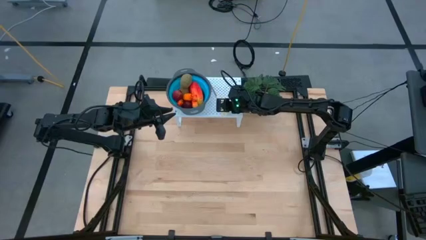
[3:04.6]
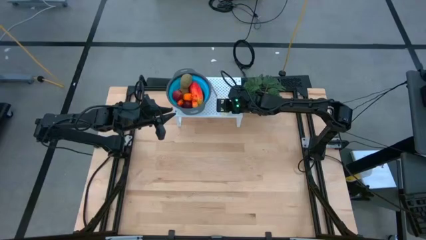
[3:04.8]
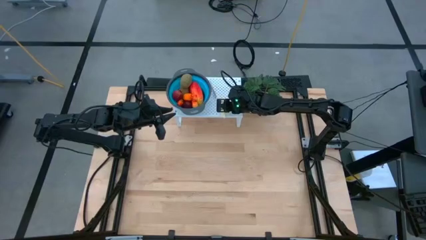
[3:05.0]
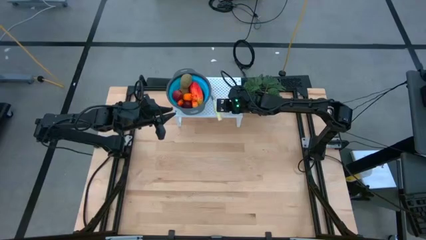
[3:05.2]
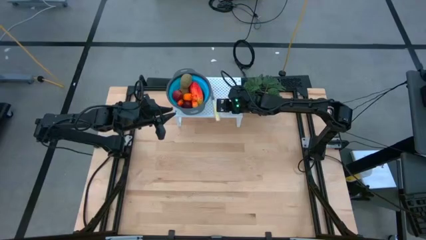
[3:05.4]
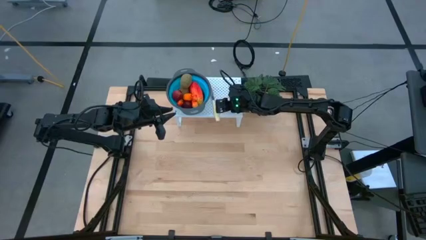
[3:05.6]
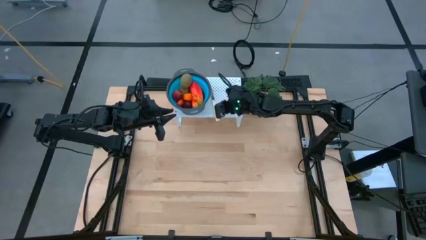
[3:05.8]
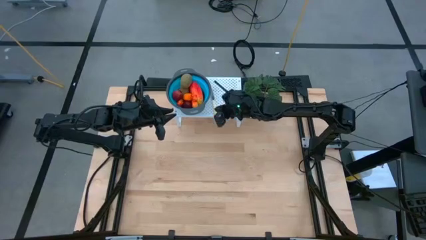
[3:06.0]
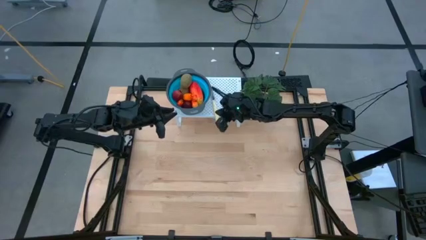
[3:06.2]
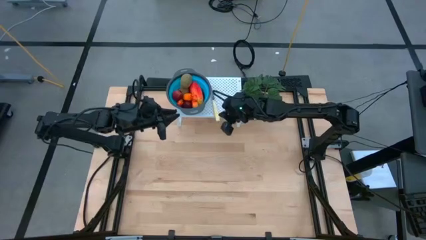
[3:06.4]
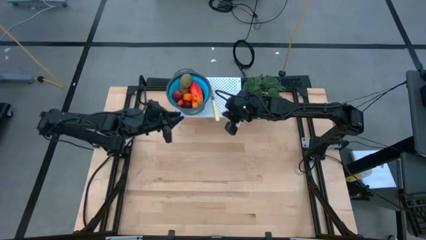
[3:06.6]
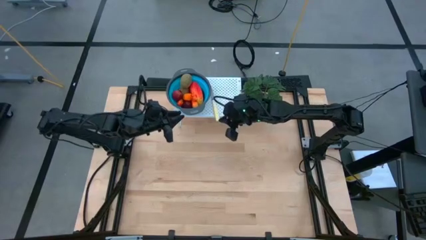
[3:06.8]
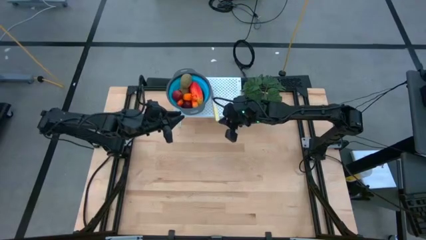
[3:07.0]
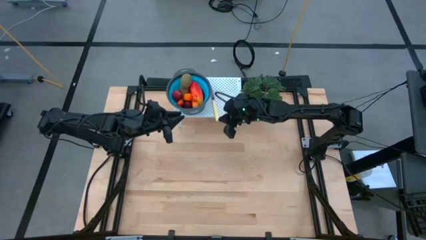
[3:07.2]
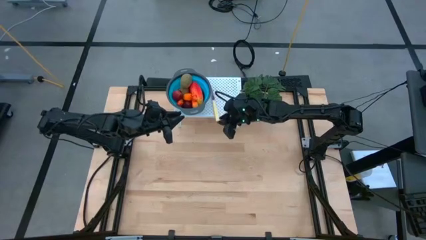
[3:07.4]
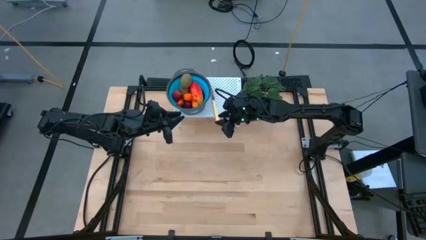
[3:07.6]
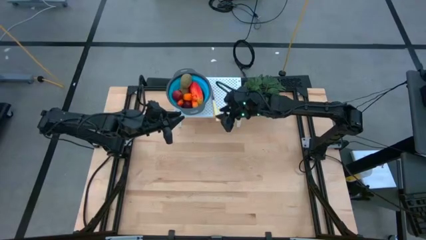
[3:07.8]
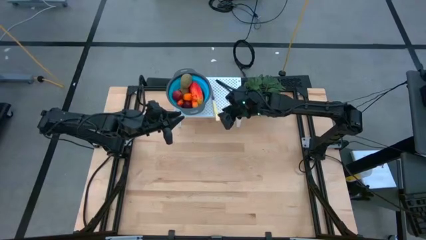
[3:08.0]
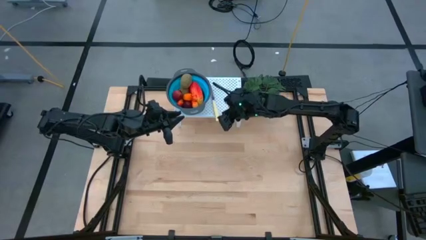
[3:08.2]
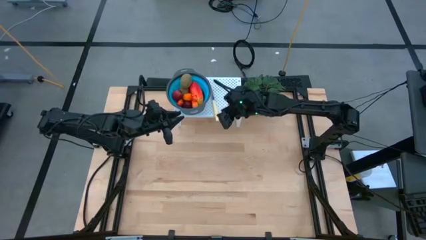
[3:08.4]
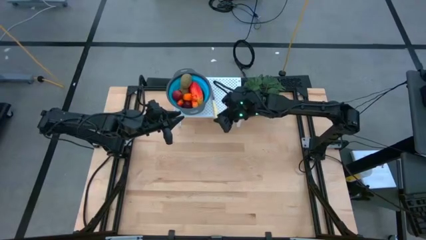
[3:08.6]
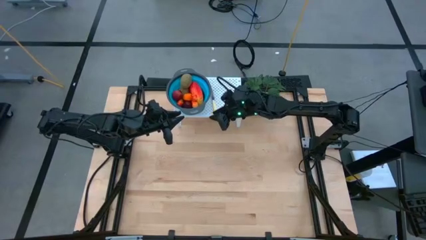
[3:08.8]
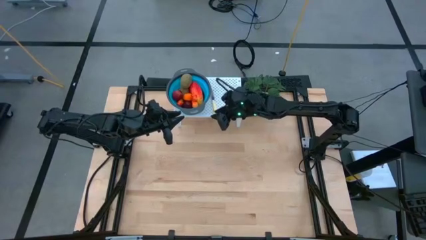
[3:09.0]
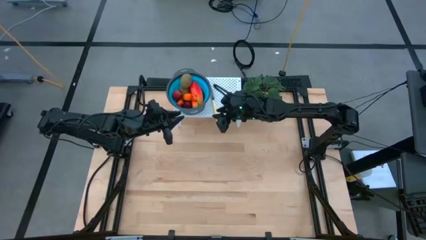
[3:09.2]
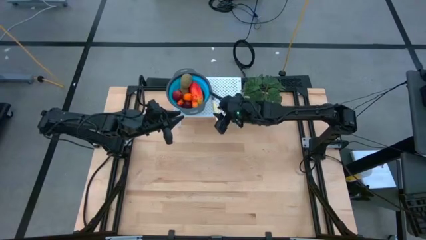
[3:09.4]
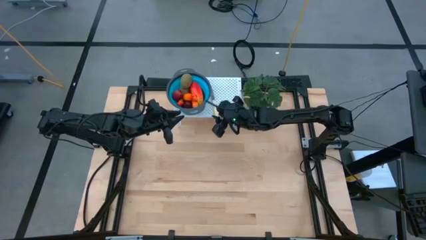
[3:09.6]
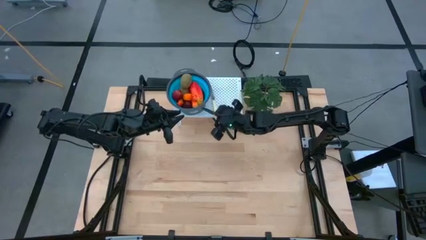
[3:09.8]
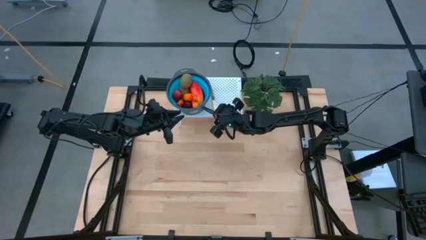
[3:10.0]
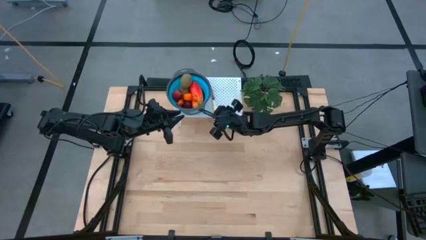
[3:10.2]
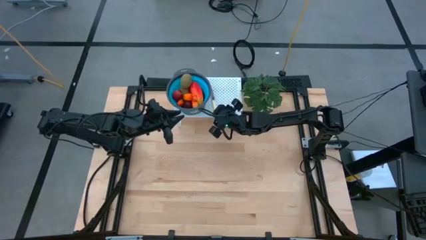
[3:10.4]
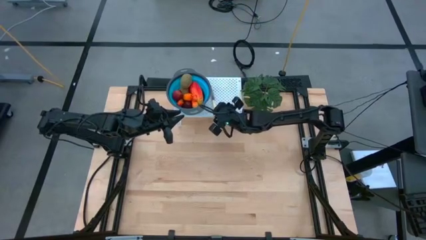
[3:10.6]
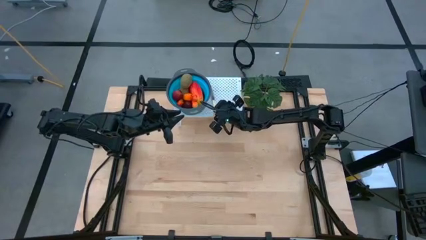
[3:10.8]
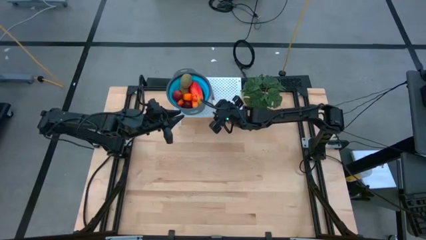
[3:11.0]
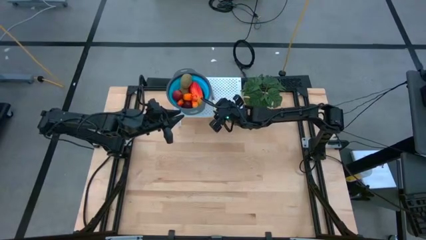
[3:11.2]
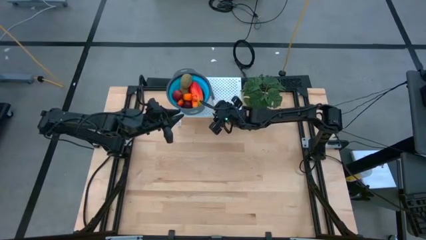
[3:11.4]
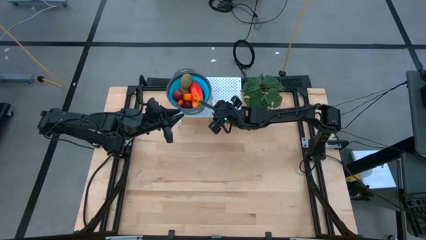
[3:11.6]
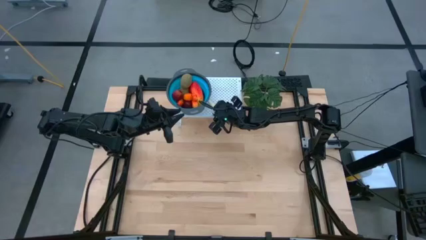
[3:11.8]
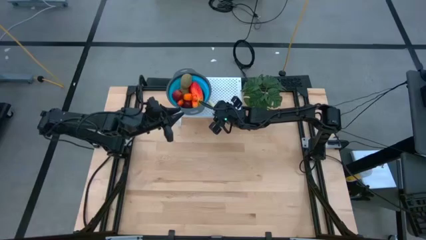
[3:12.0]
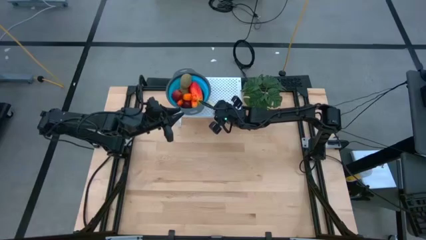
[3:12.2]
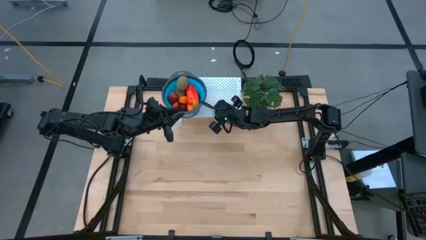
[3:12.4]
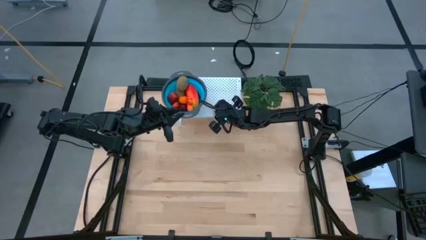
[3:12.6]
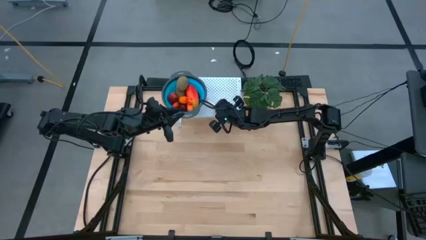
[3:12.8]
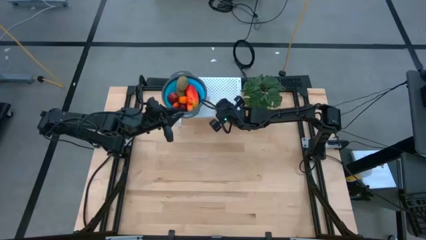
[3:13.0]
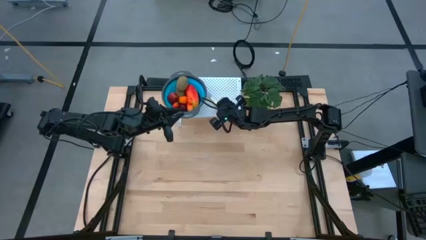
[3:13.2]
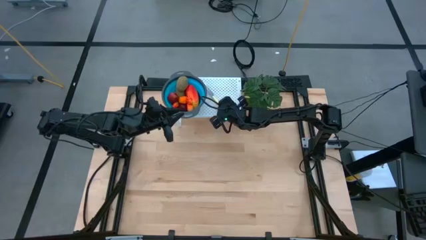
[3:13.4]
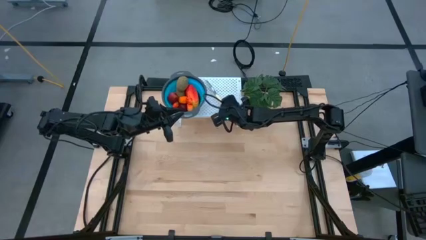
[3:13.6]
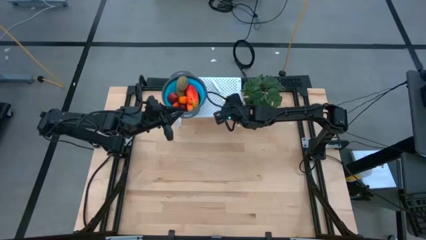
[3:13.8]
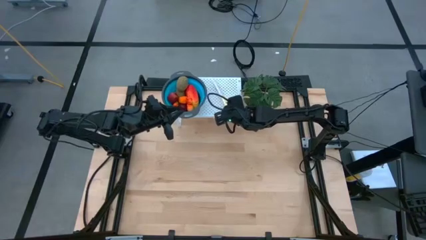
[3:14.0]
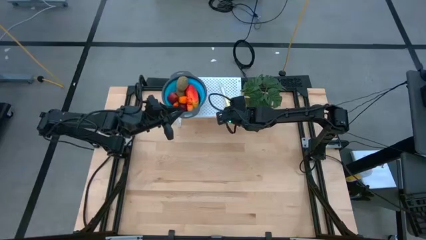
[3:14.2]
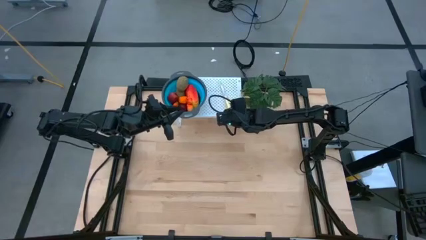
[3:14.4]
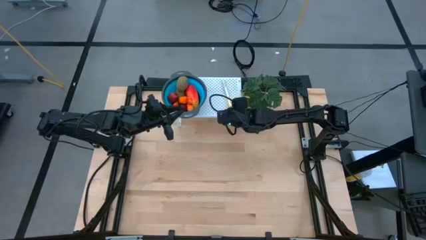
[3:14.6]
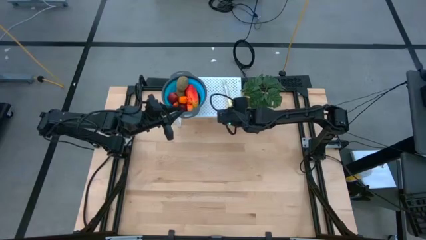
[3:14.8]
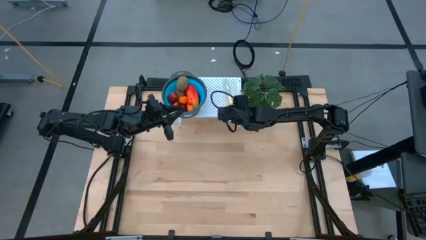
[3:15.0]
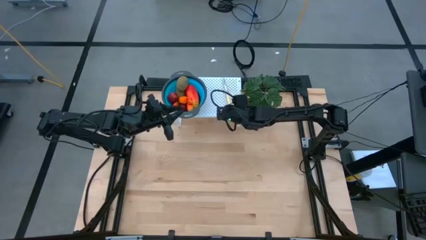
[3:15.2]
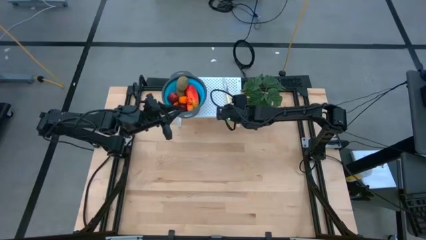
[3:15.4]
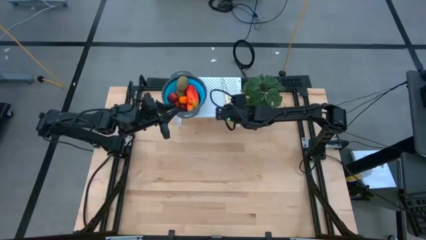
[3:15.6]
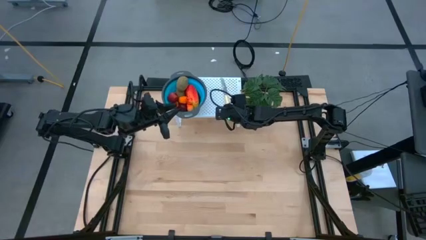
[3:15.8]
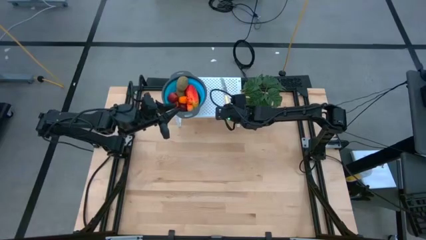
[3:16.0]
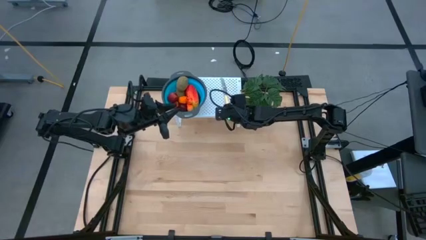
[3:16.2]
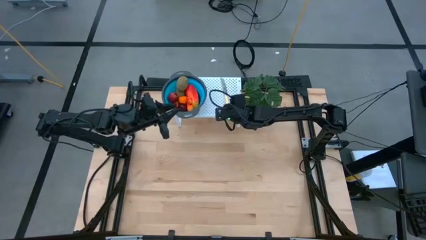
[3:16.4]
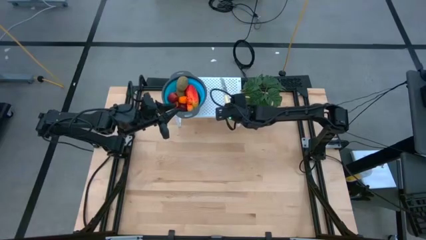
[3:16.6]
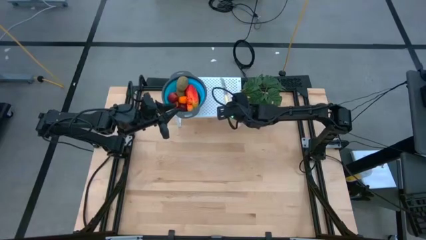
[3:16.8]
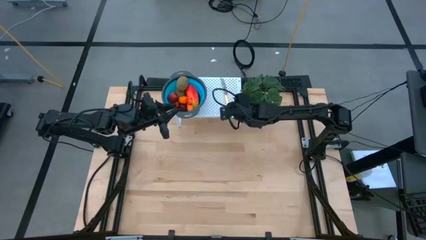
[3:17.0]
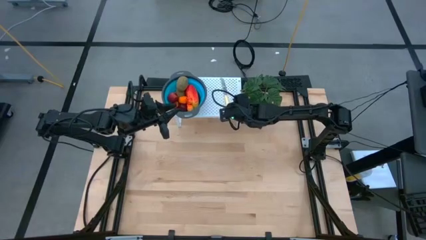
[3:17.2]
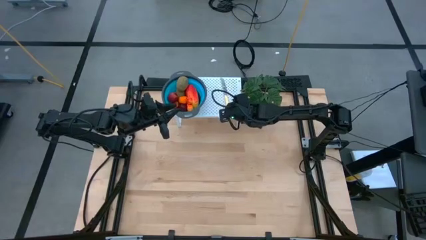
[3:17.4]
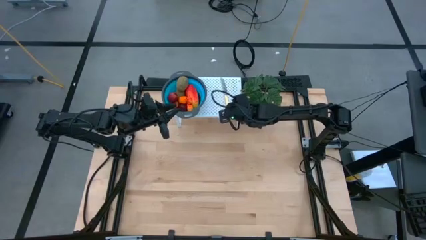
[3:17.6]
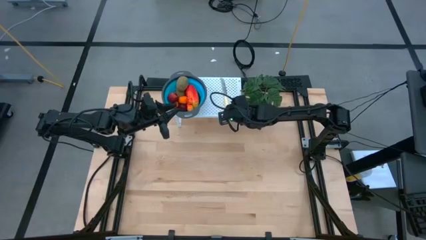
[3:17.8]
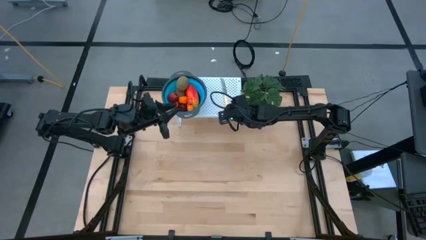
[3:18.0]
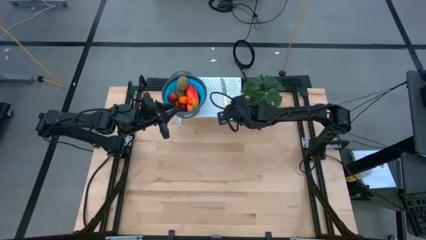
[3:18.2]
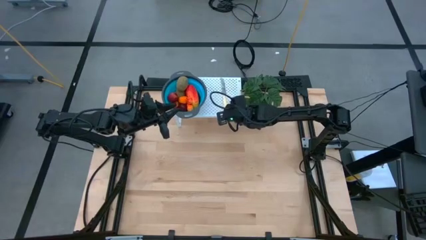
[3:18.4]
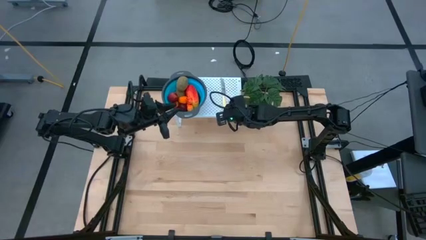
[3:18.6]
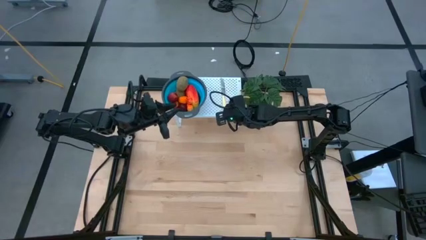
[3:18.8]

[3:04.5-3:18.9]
Task: Pick & Place Fruit
Put the table knife on the shelf

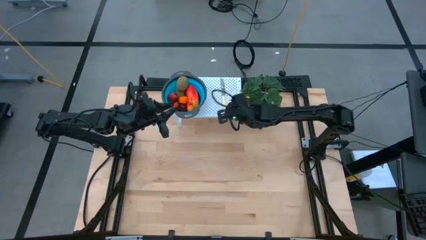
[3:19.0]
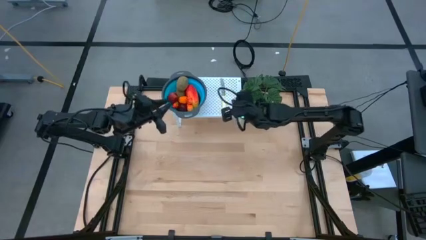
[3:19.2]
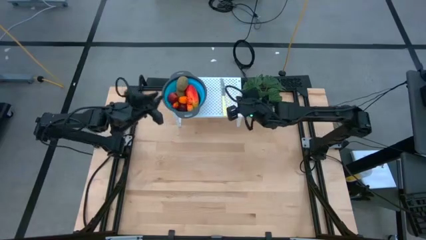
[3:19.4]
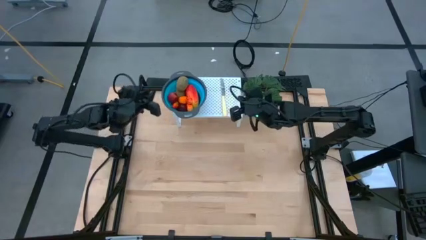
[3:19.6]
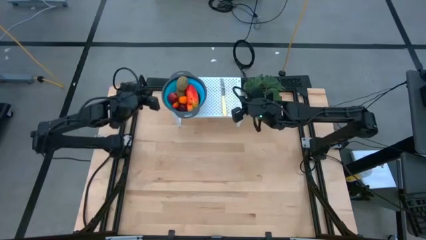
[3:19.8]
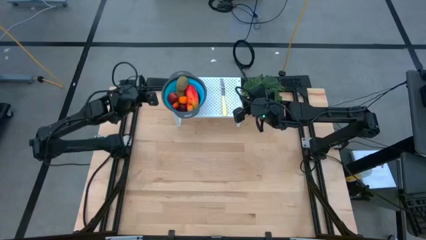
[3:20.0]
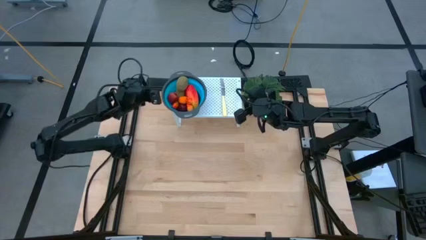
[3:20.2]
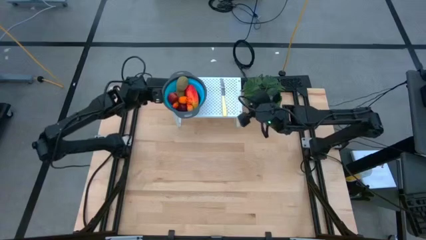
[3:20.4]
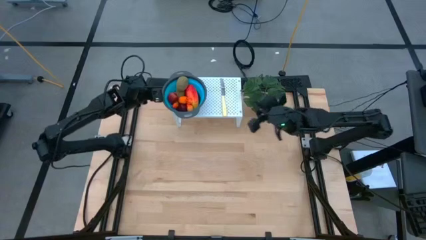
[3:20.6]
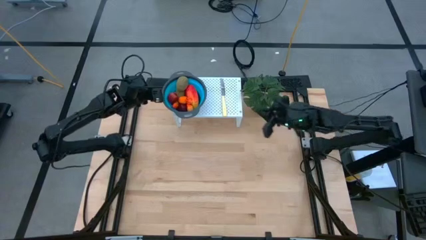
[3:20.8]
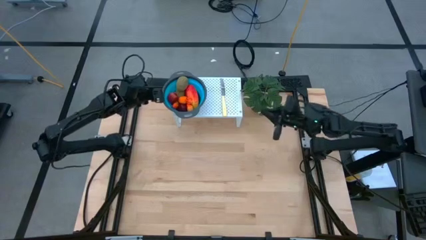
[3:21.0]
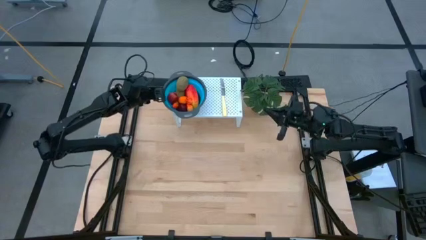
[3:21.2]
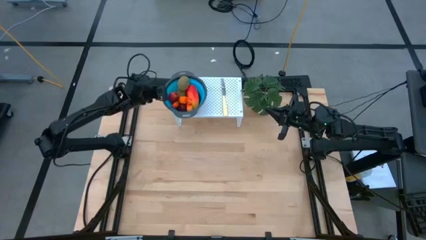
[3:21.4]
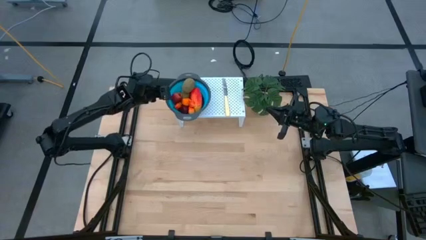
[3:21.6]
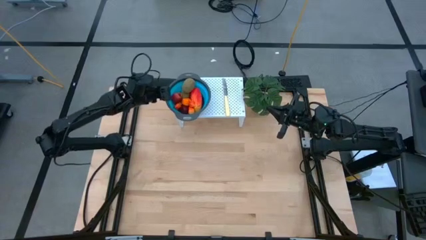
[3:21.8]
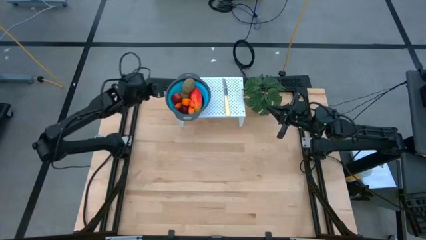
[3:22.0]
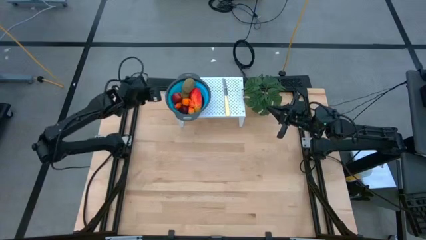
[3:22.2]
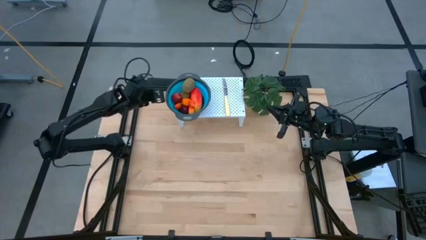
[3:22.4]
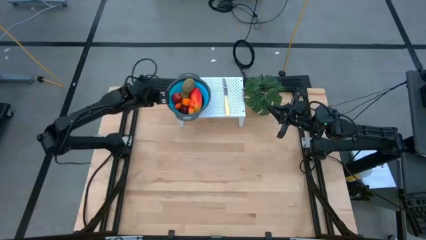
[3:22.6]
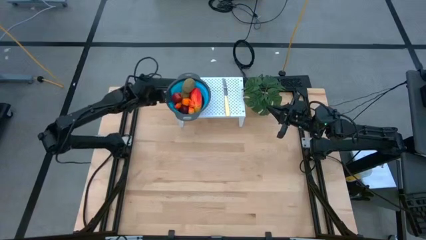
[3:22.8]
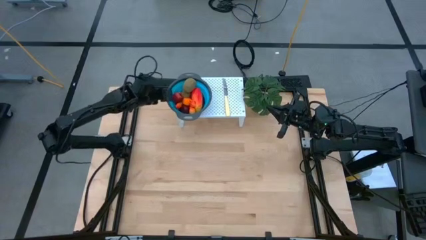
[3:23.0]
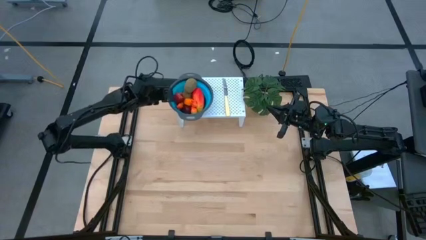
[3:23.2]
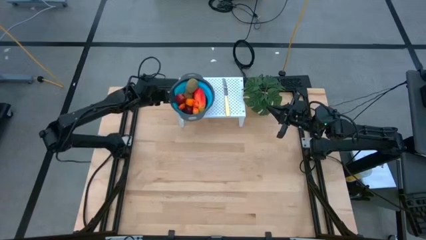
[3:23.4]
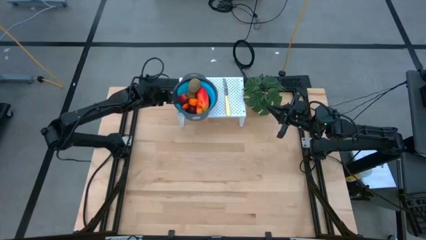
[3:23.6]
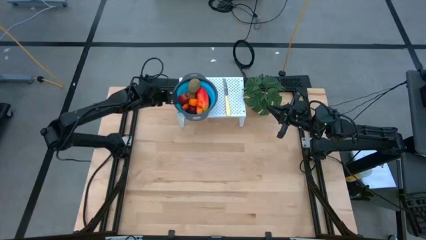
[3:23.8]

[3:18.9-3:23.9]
Adjust the blue strainer bowl
